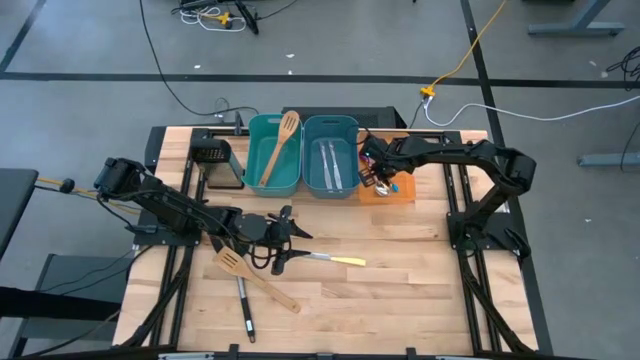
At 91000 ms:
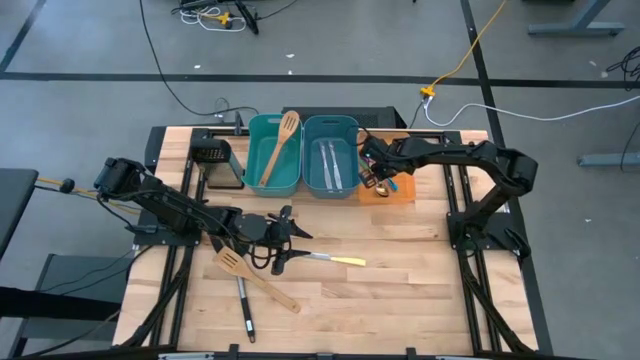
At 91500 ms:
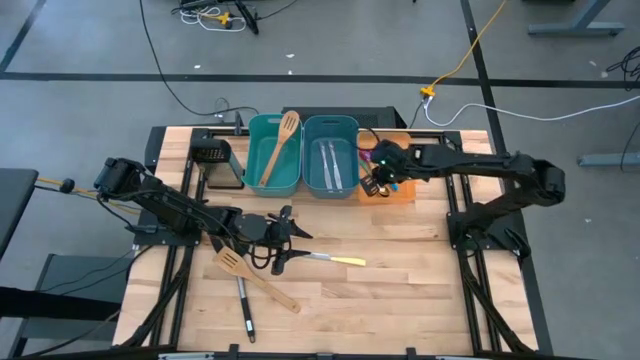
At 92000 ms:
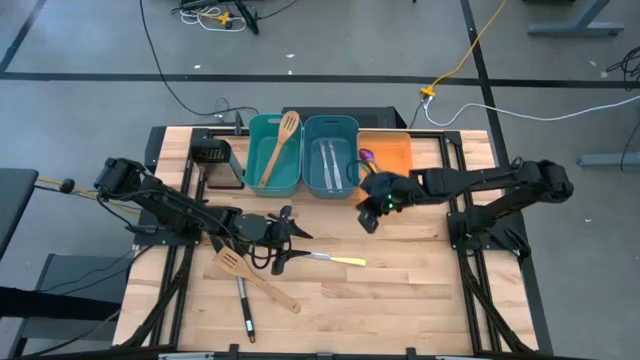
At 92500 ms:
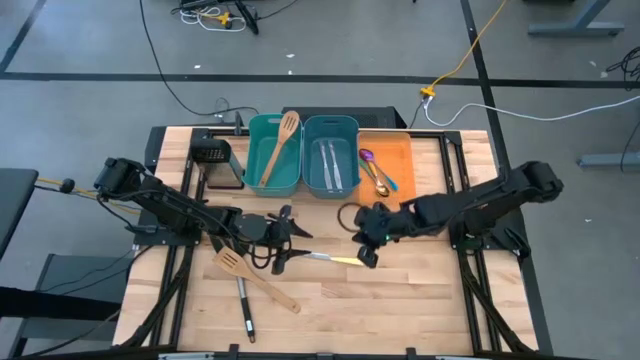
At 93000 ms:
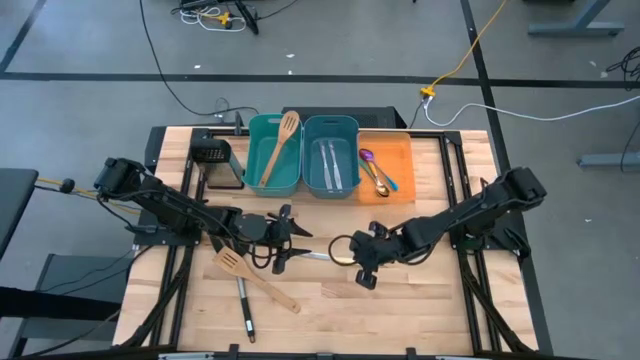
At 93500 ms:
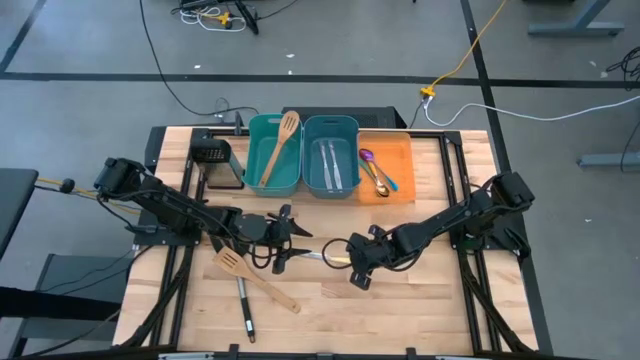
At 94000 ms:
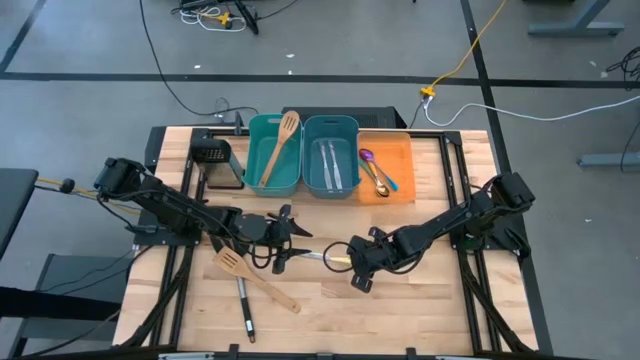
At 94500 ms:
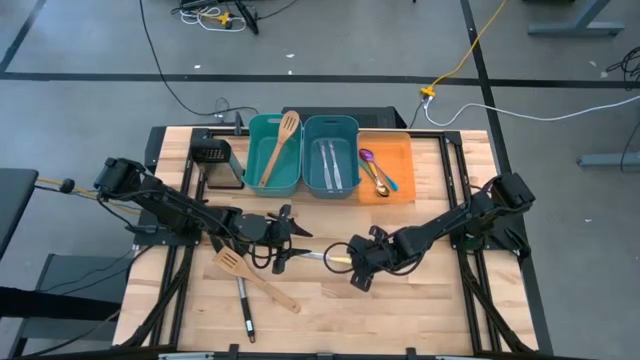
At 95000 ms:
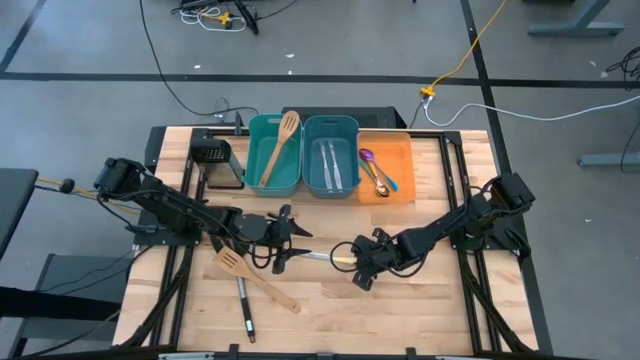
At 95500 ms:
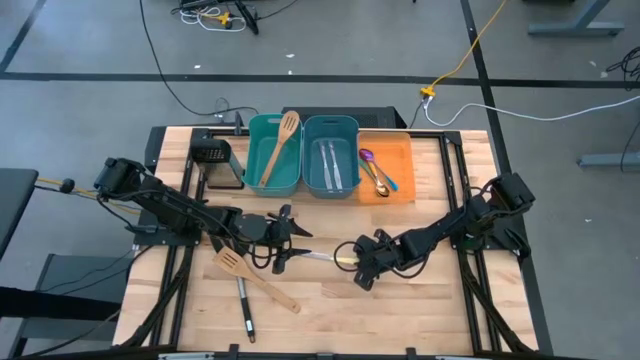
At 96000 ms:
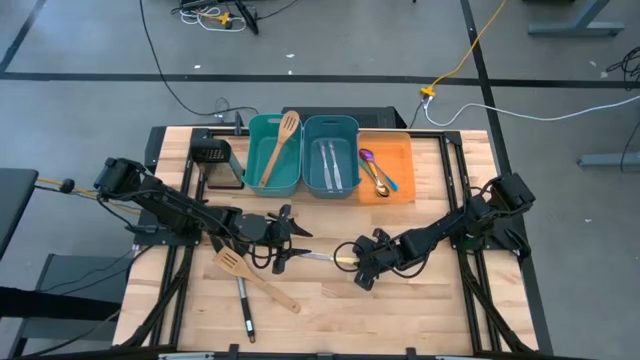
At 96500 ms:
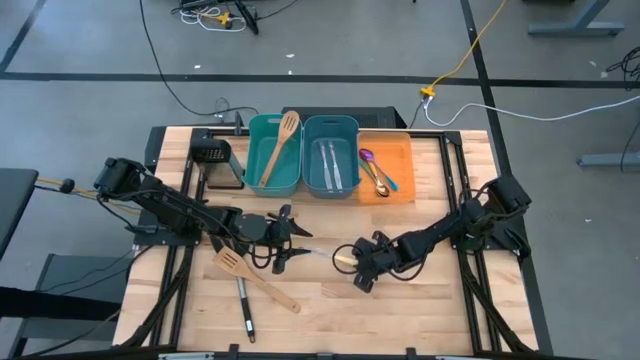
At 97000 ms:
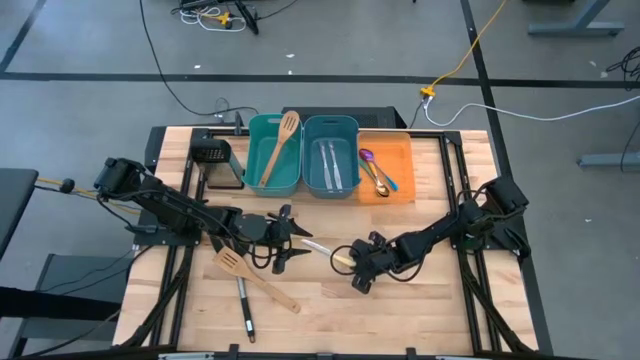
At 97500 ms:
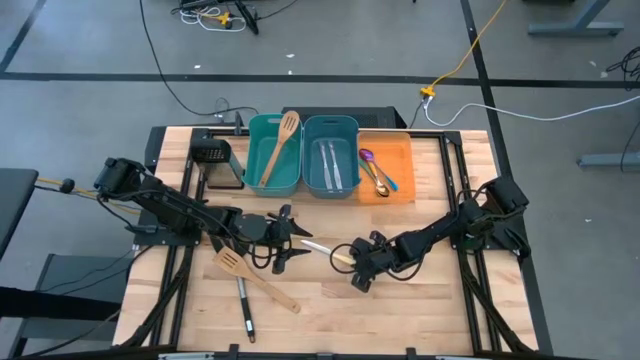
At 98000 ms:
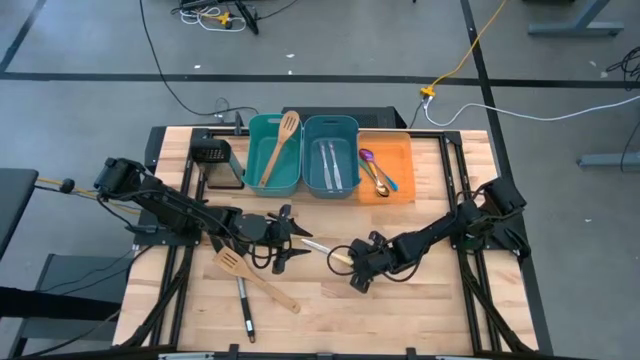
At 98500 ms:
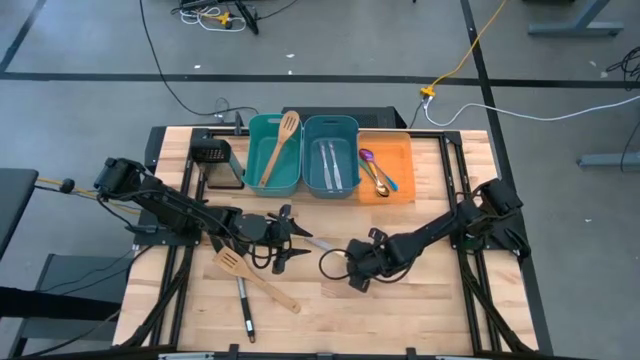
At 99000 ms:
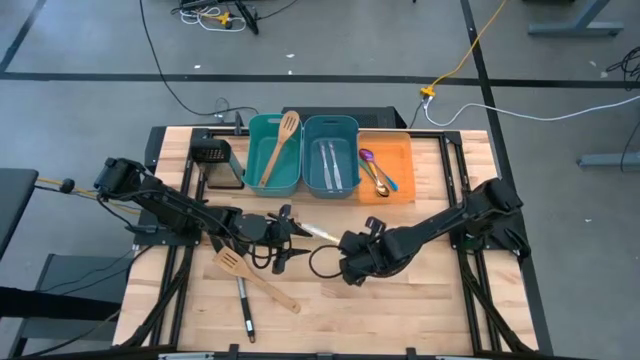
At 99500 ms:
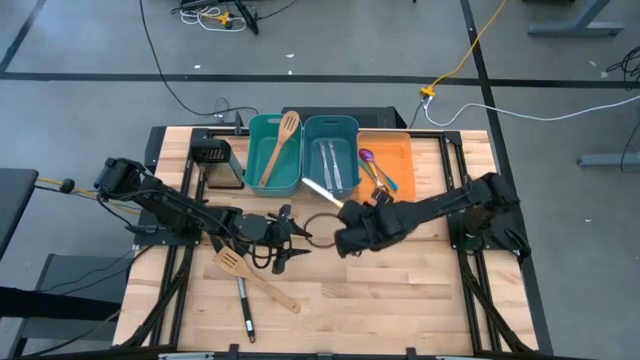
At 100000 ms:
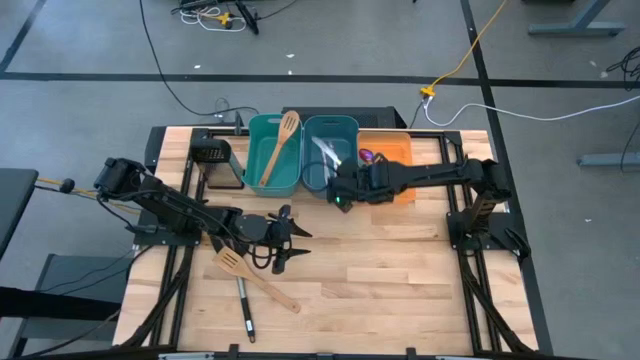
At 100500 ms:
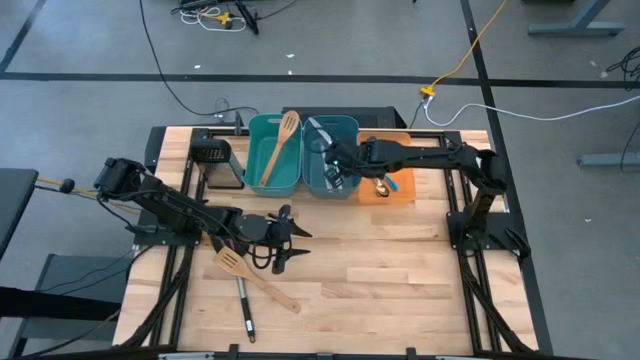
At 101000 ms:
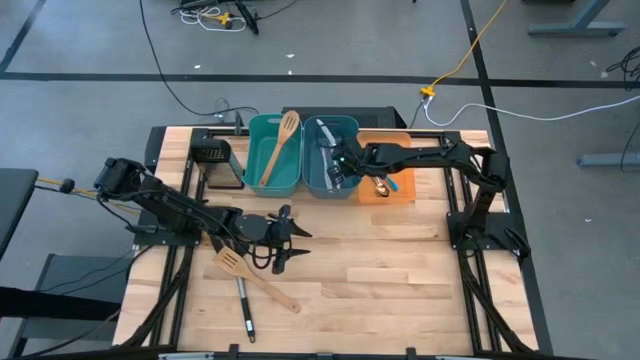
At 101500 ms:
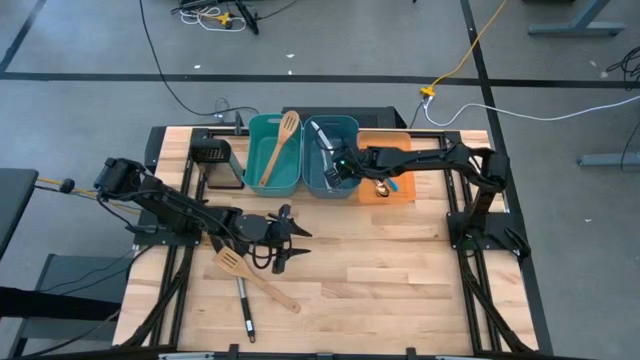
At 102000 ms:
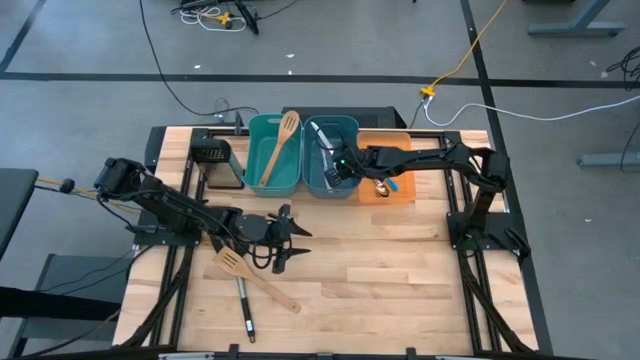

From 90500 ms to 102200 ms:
Task: Pick & Place Kitchen Items
Put the yellow knife into the blue bin

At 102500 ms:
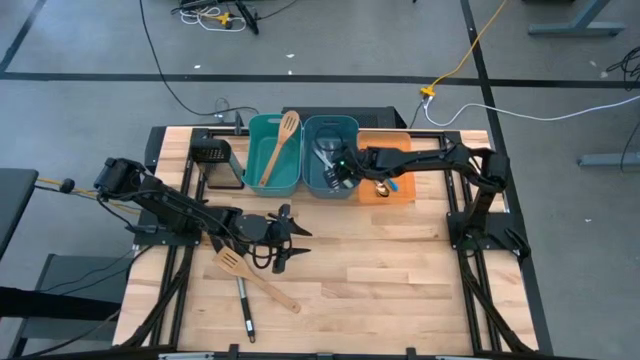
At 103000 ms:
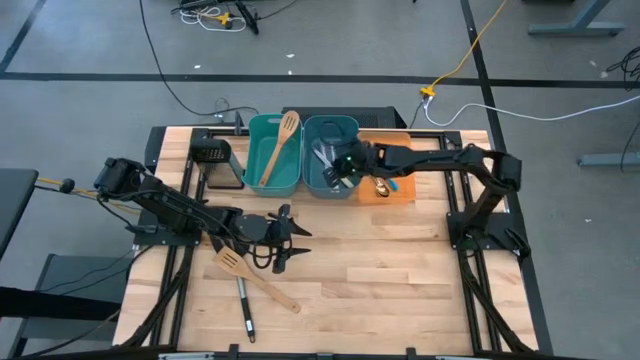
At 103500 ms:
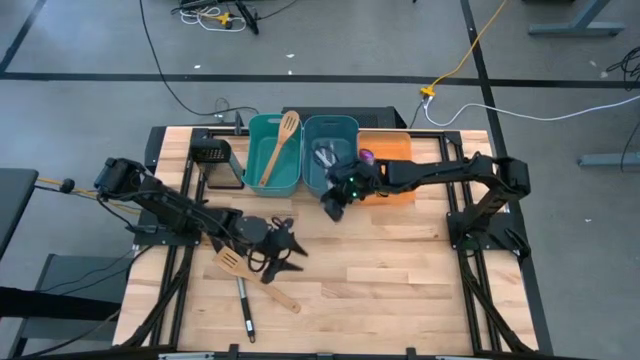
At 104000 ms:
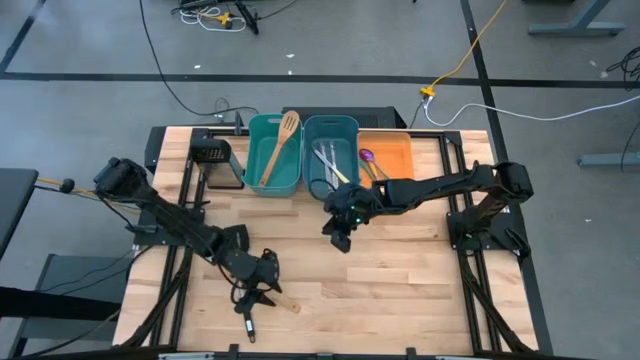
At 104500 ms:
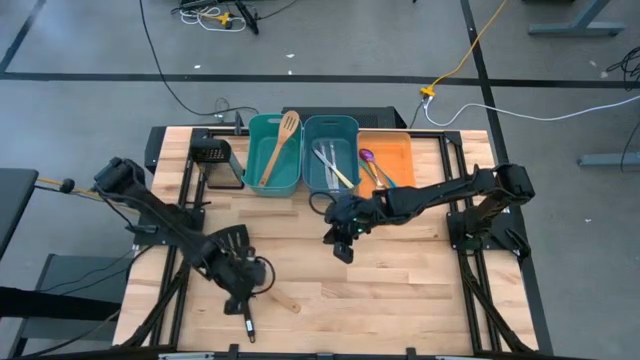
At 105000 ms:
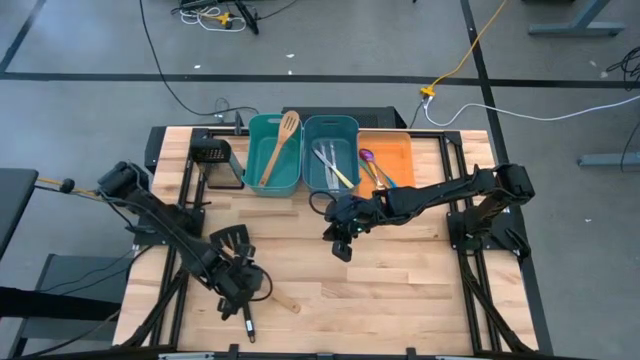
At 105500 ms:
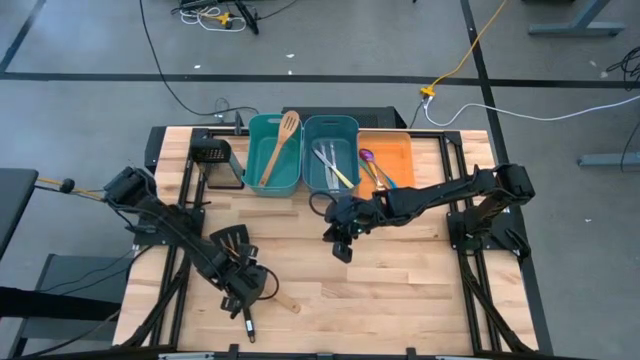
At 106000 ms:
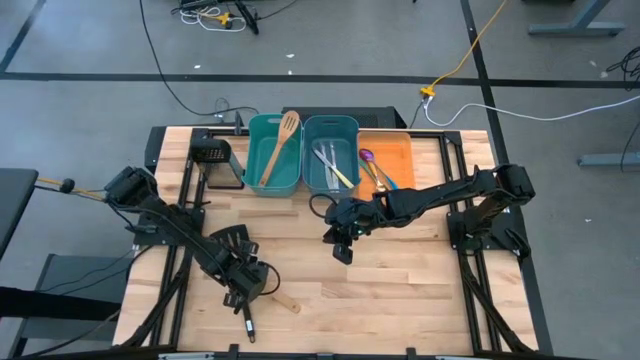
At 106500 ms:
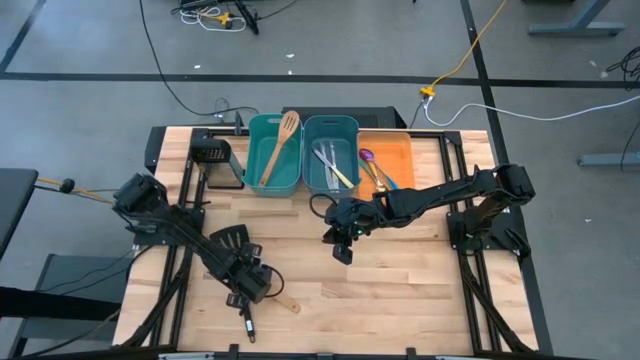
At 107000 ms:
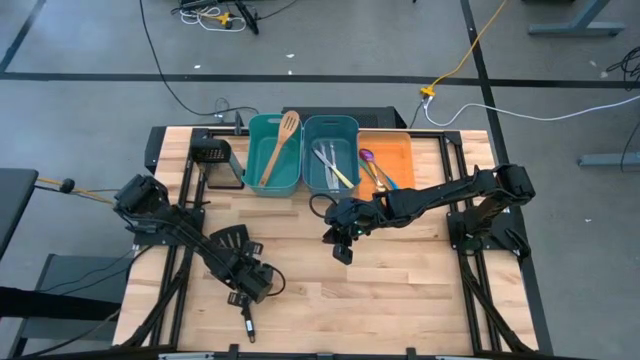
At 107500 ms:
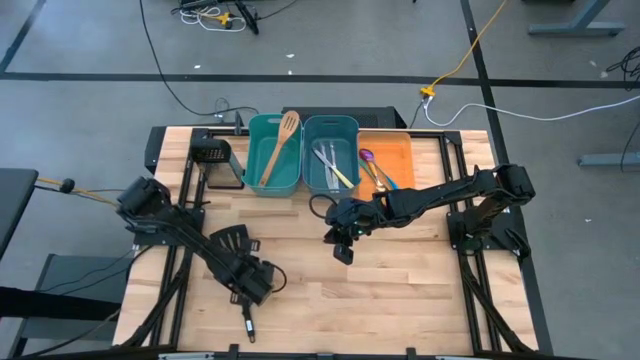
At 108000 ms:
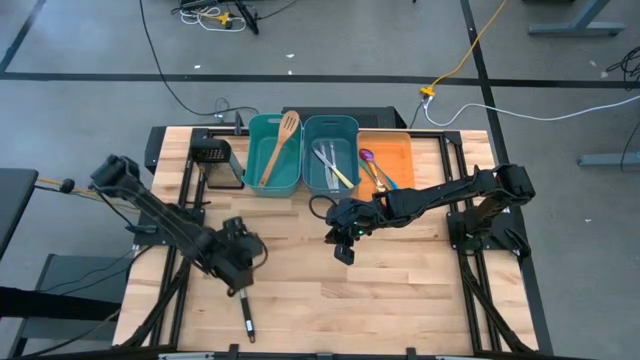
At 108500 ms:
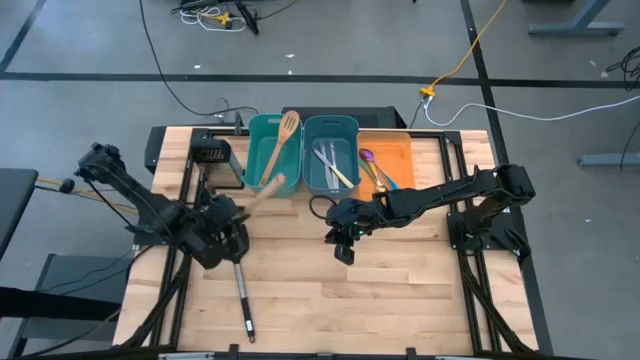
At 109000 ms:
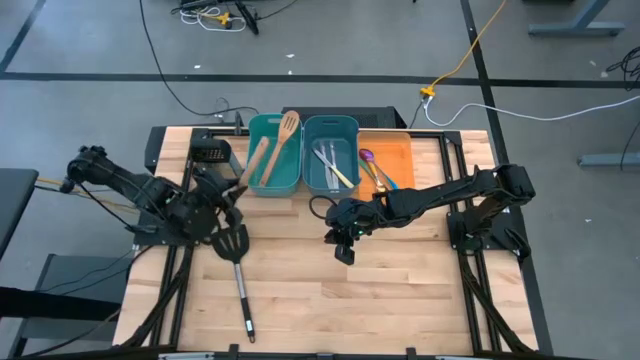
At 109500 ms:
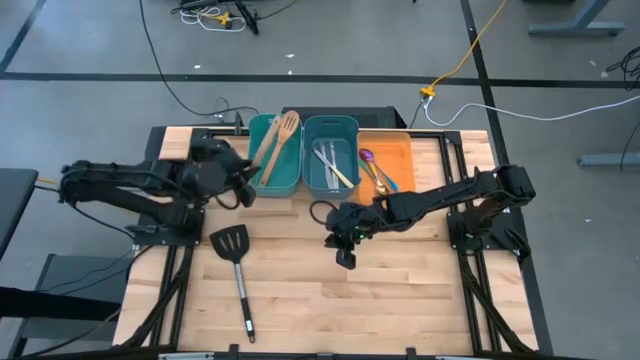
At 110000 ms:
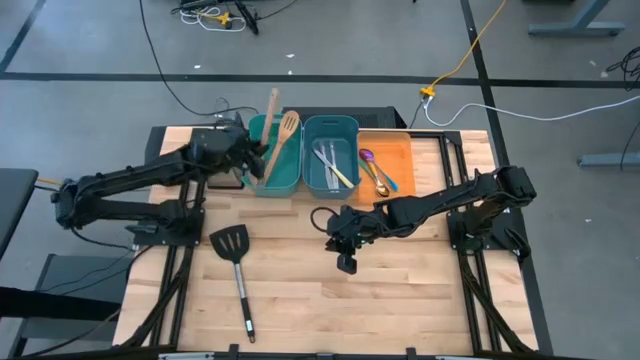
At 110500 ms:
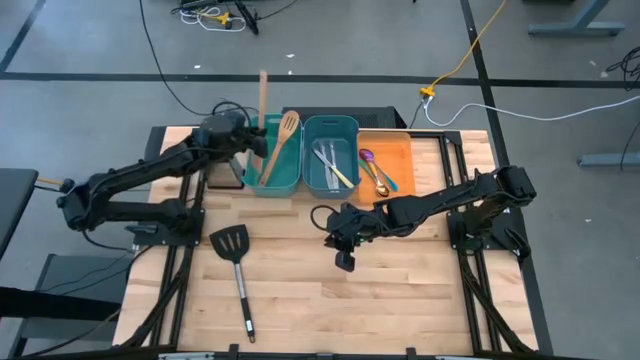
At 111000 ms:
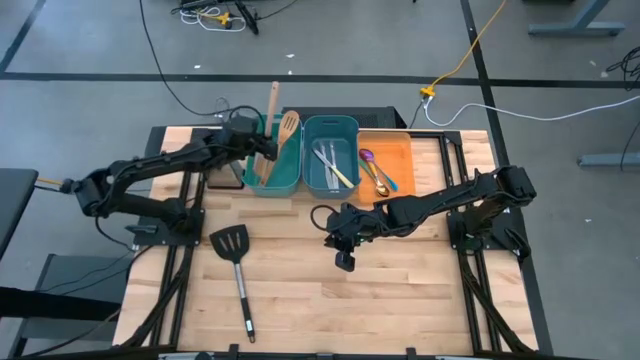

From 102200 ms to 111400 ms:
Put the wooden spatula into the green bin

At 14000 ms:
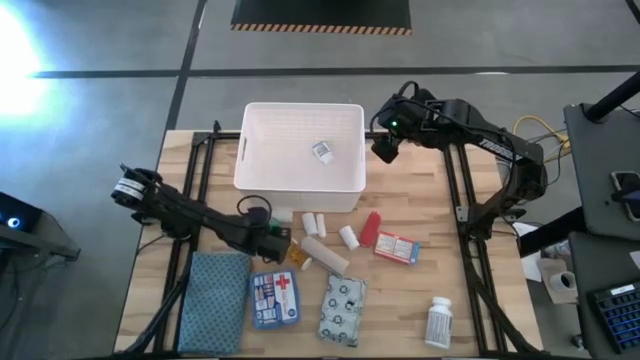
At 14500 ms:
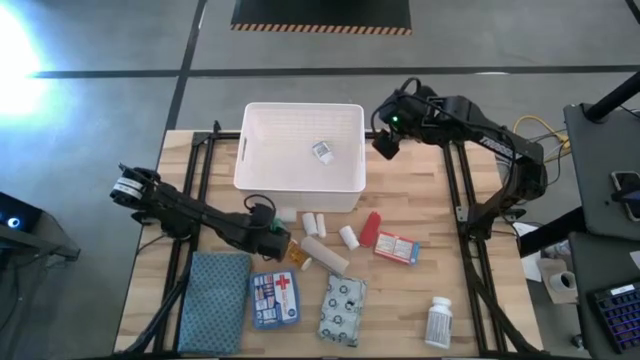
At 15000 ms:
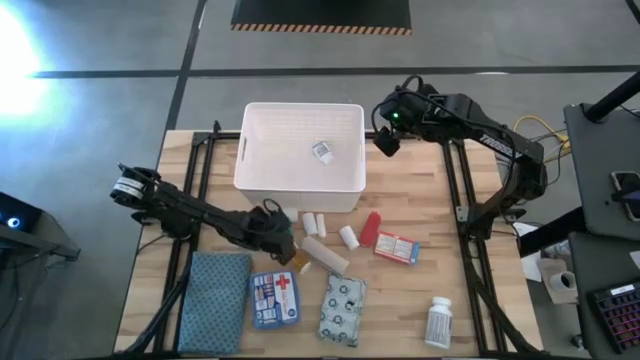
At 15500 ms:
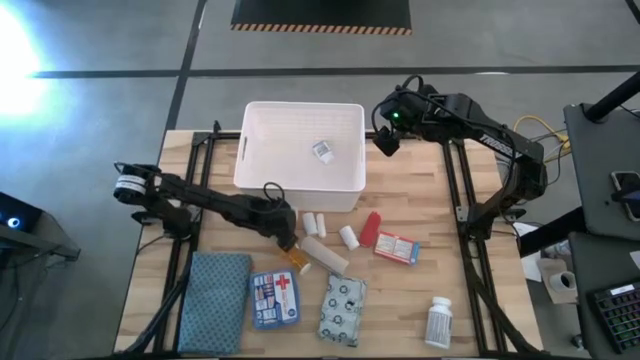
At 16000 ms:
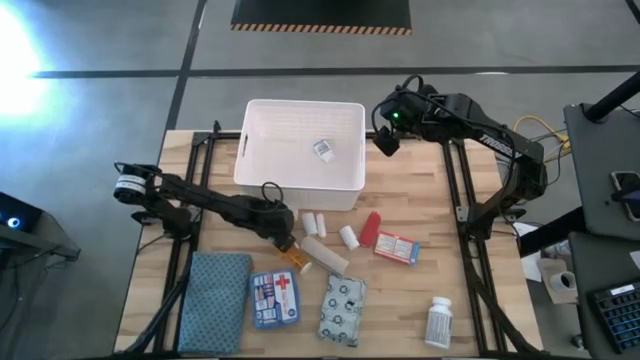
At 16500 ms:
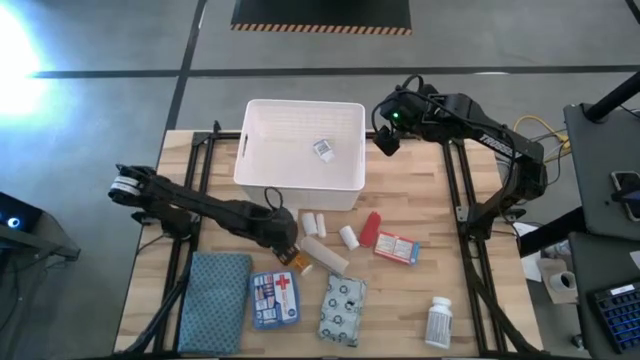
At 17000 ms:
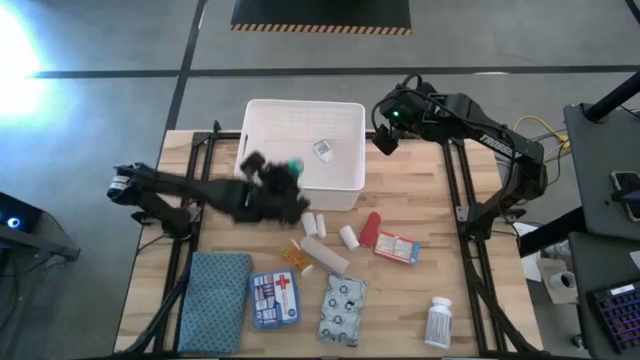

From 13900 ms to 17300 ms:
Task: Pick & place medical supplies in basket/bin
Put the green bandage into the white bin
